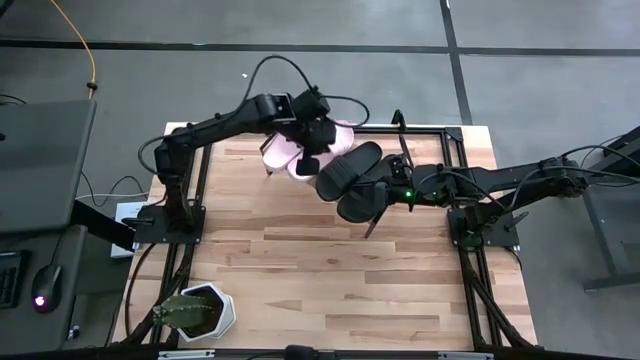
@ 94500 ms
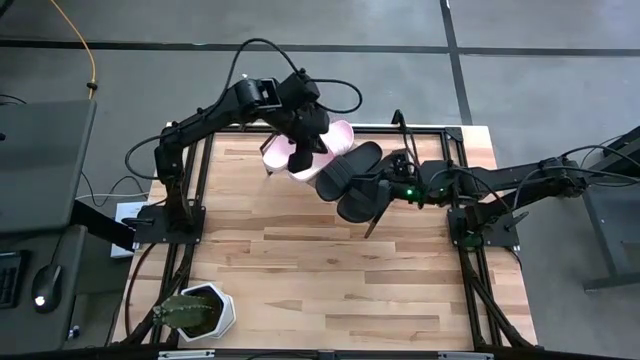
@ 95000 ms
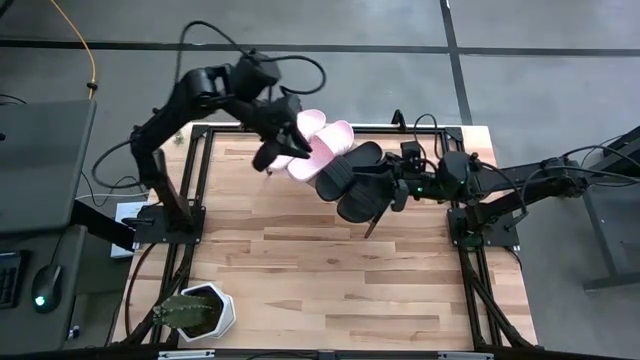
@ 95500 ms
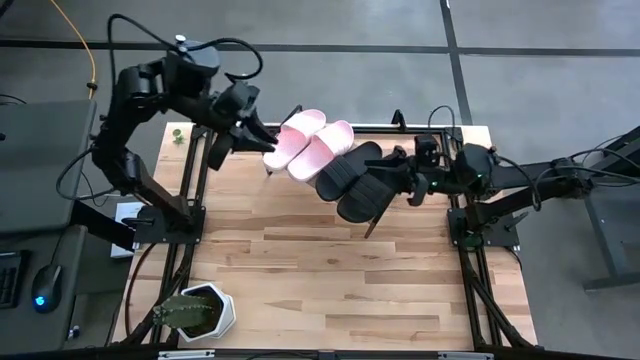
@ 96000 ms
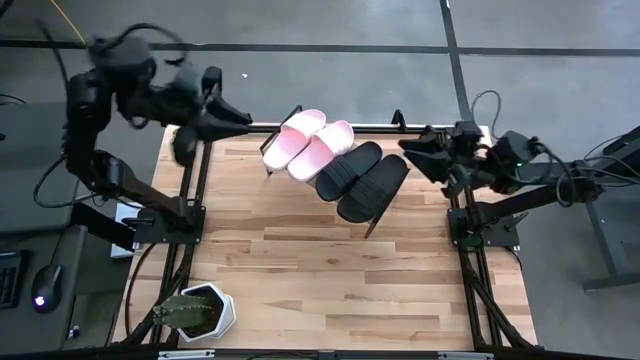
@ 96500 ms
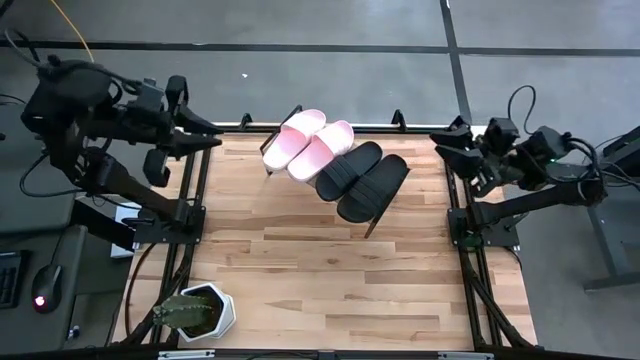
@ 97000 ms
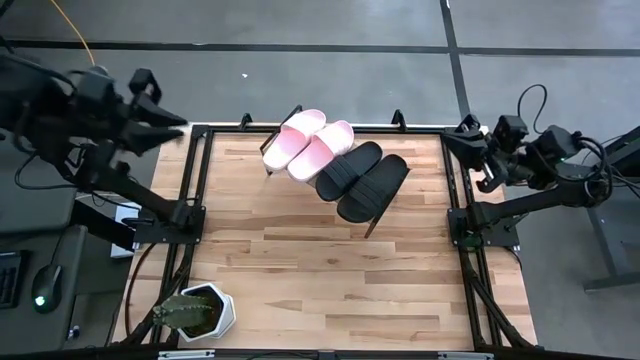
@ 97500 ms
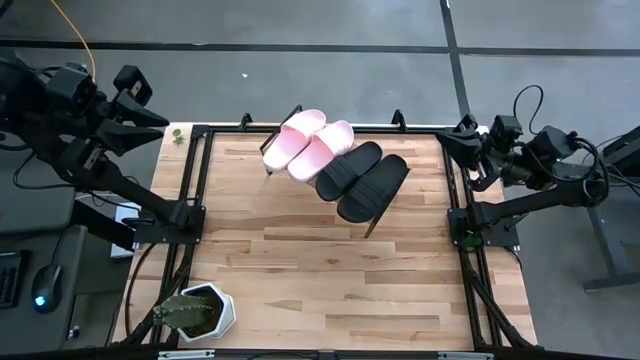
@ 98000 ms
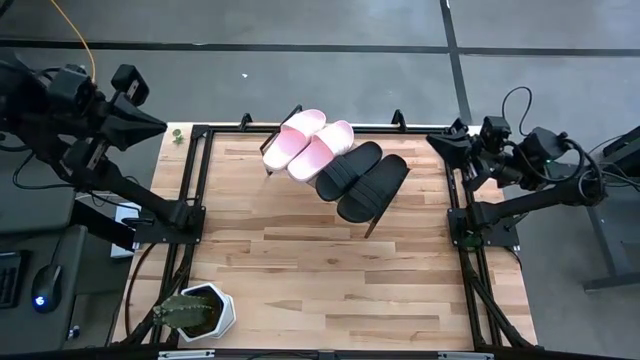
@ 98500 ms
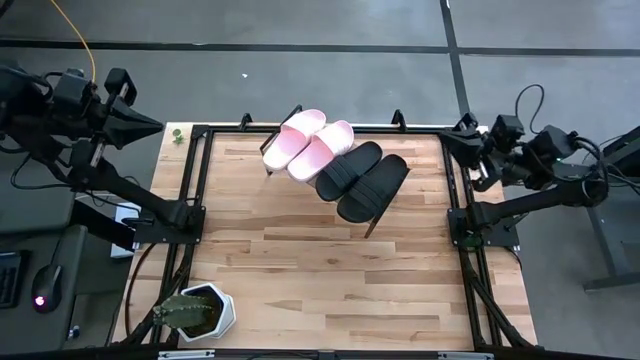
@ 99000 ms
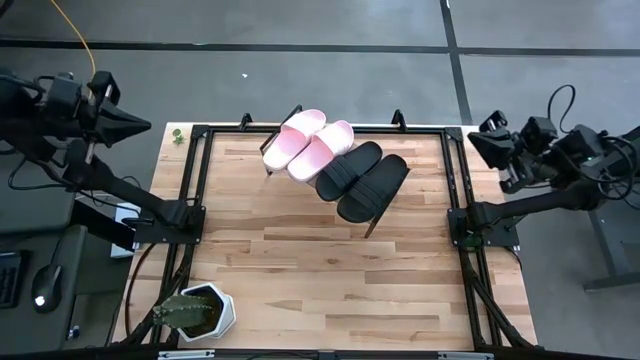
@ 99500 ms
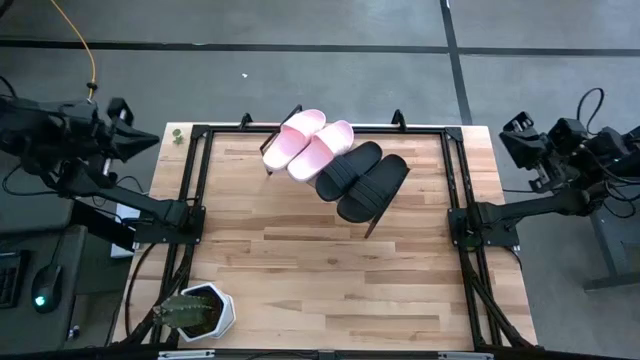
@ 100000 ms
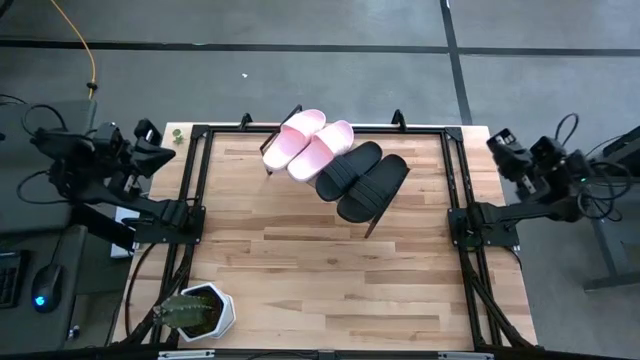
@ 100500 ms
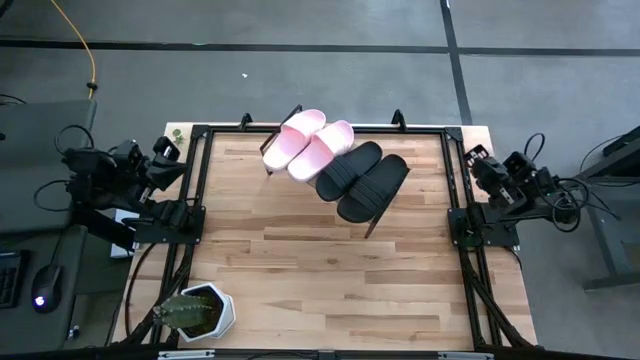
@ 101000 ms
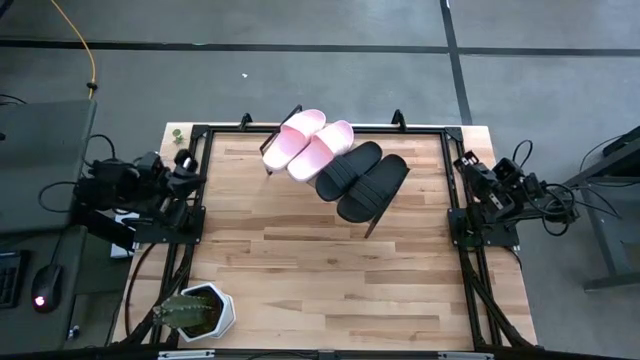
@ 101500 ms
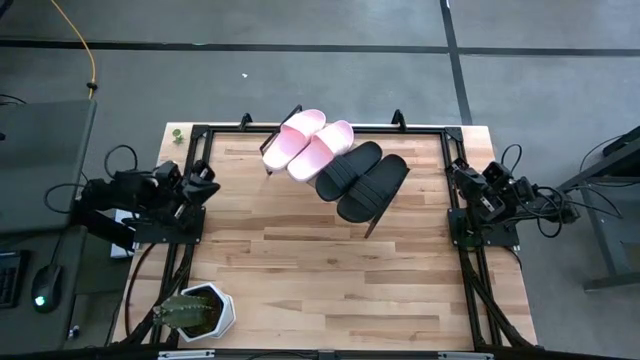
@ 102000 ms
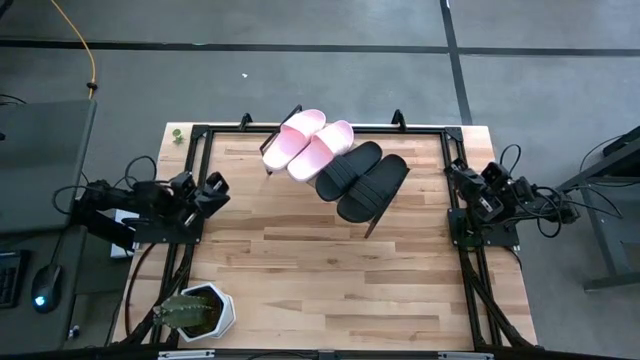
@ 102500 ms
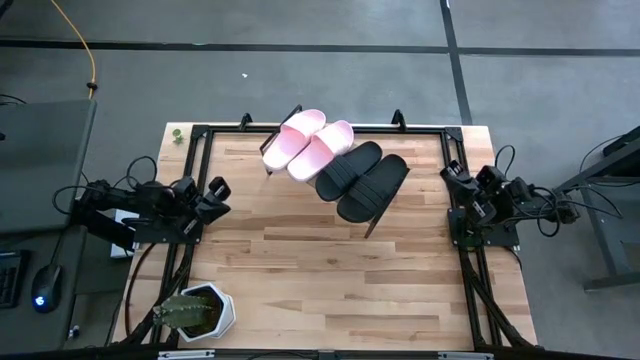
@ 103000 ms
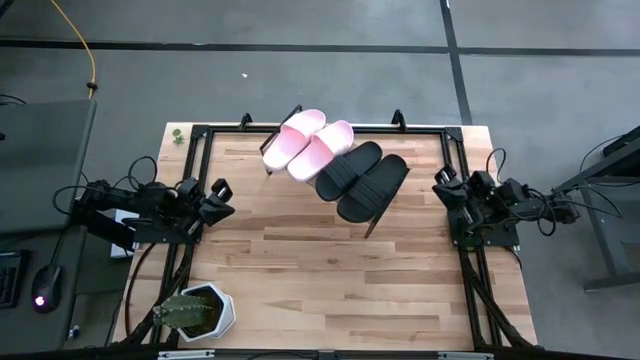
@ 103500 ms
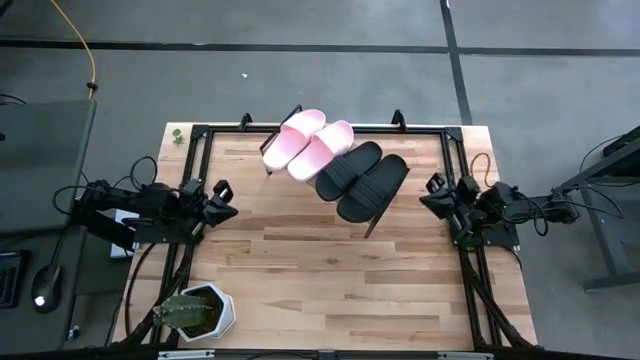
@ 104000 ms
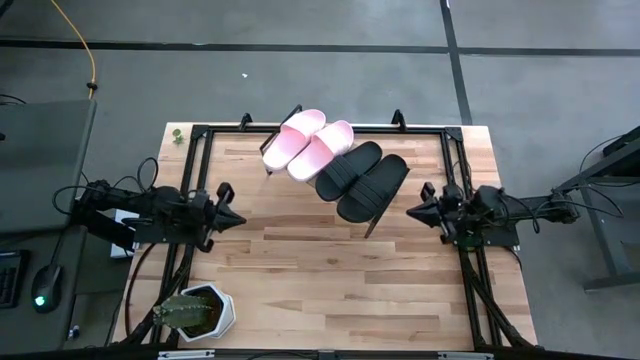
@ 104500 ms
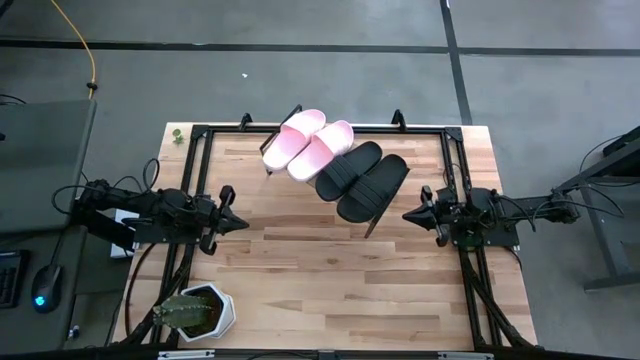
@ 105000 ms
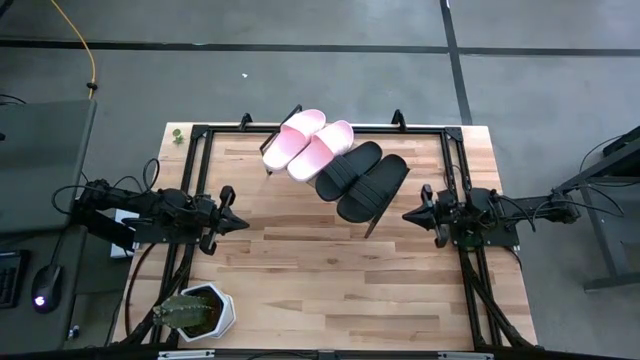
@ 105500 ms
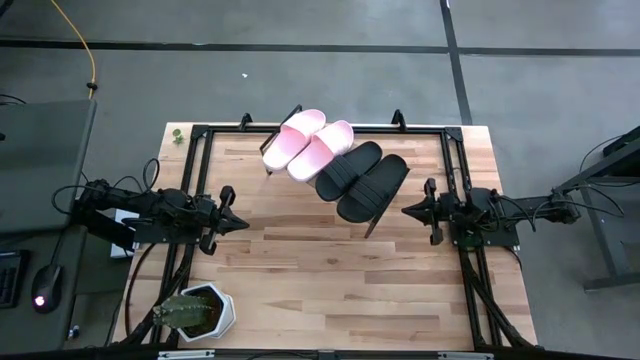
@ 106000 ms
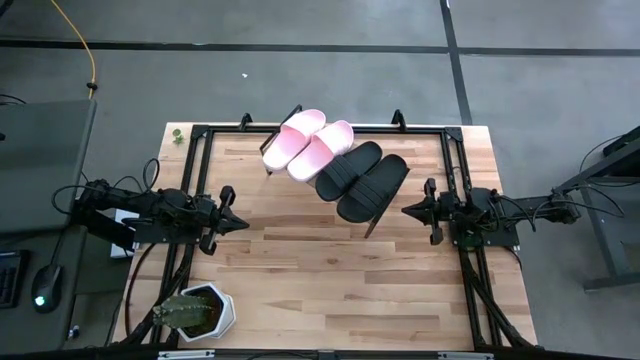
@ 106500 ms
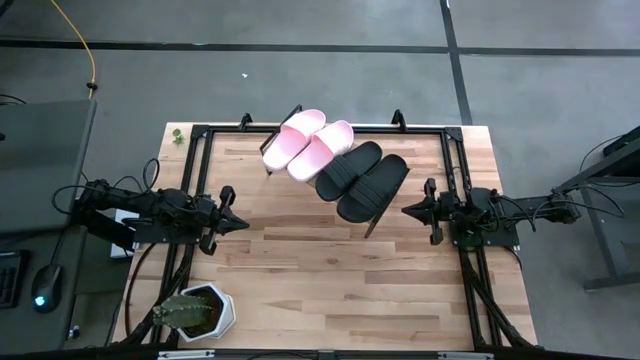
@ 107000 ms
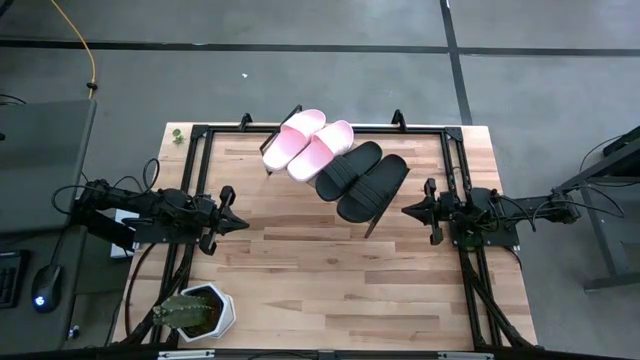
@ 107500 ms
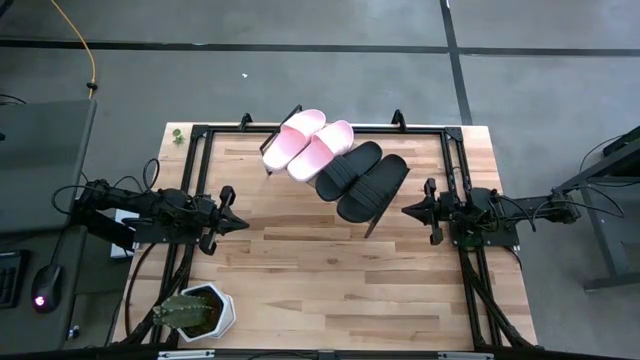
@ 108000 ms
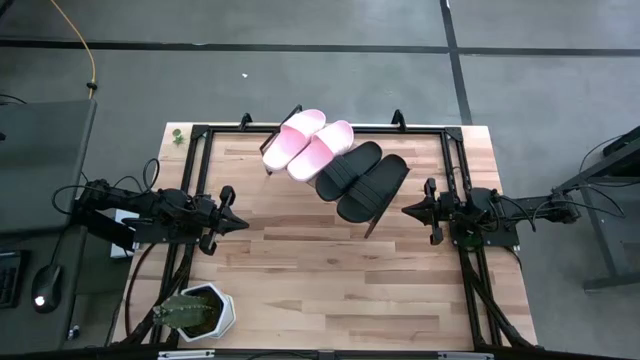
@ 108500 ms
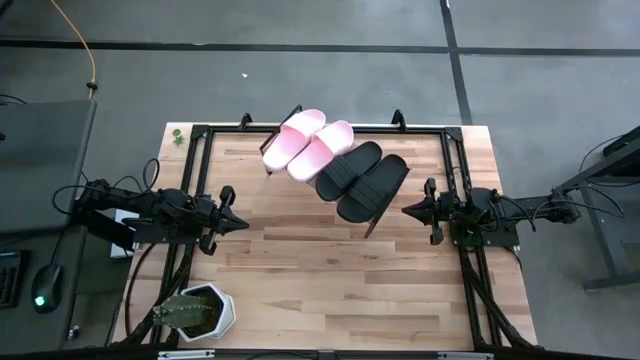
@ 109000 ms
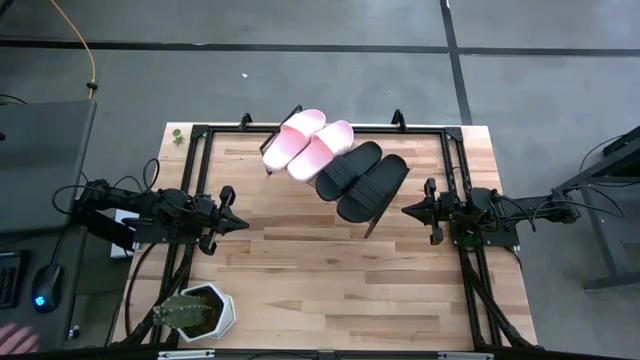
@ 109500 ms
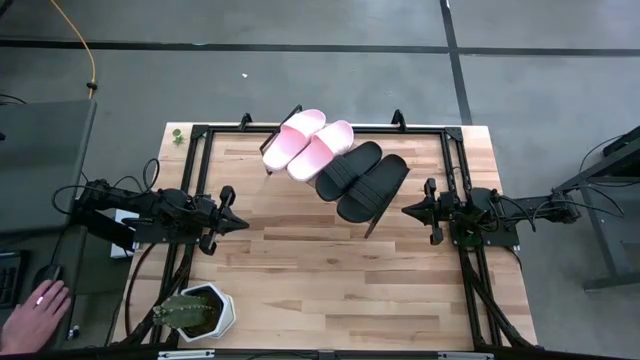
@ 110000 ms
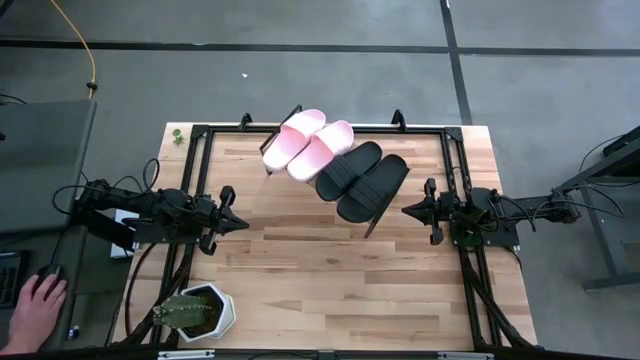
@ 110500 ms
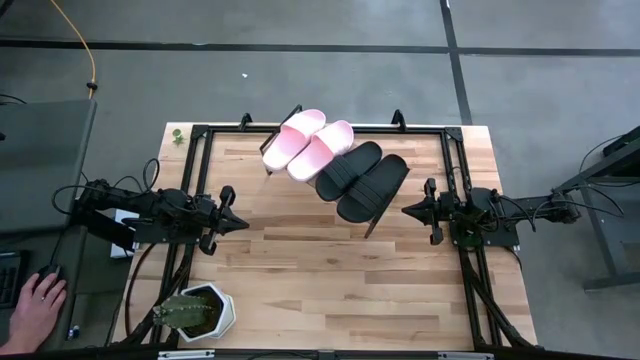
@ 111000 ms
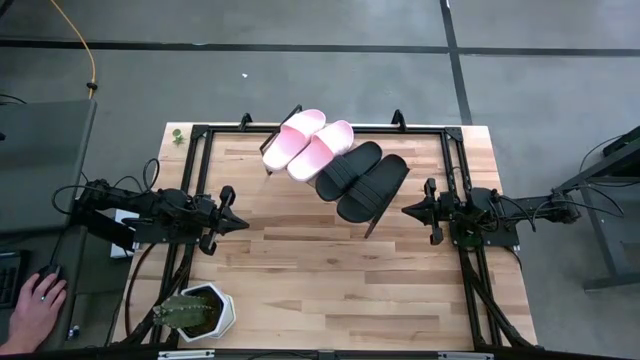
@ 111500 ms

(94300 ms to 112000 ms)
Task: Pick and place slides into the shelf
Return to Home Position

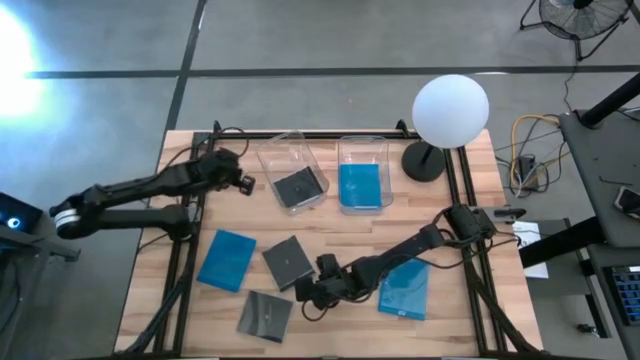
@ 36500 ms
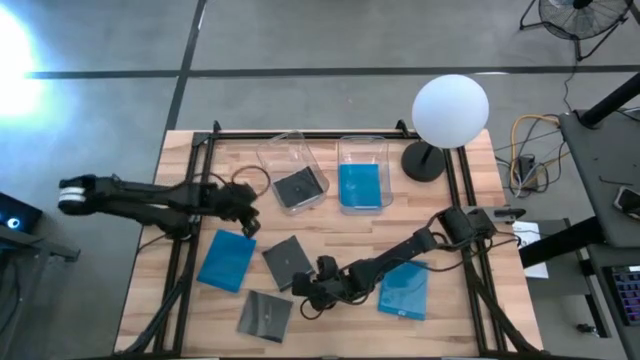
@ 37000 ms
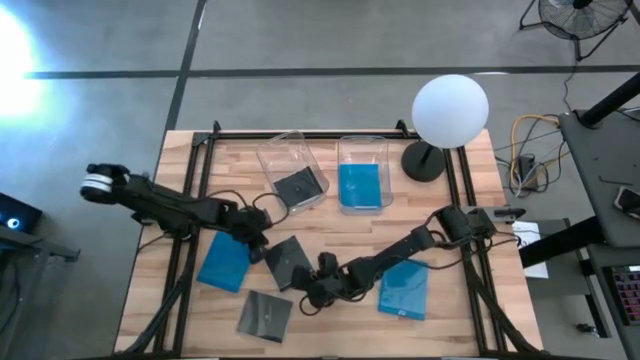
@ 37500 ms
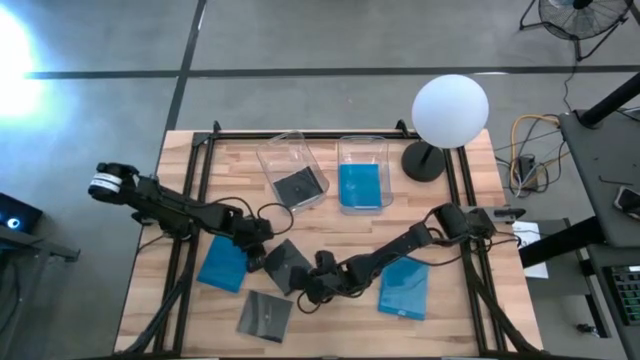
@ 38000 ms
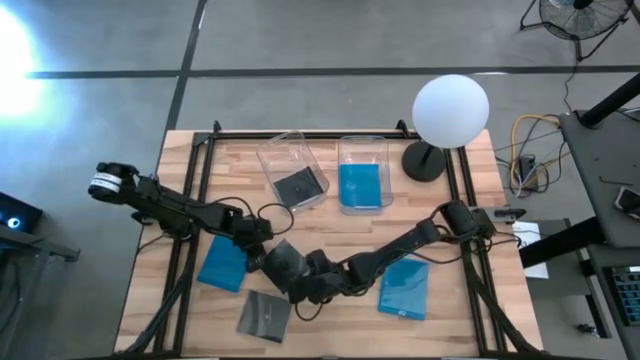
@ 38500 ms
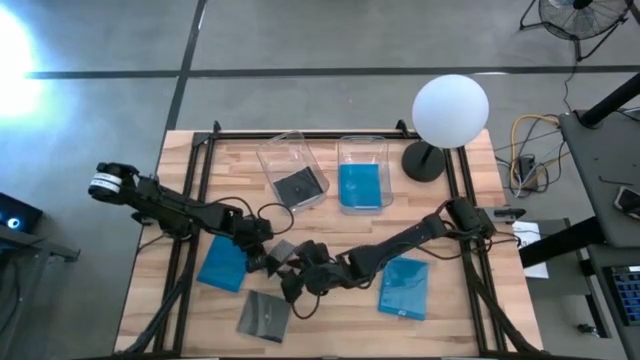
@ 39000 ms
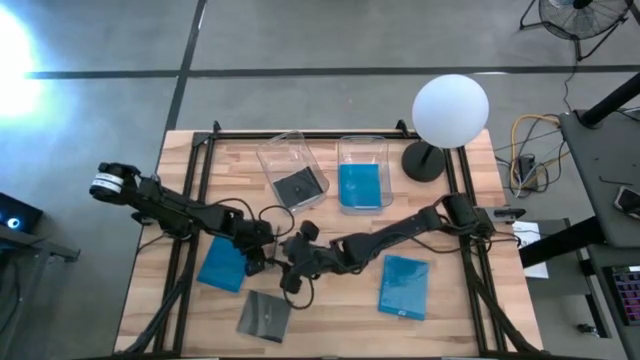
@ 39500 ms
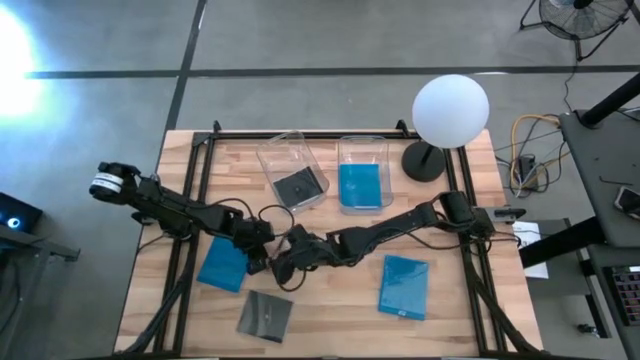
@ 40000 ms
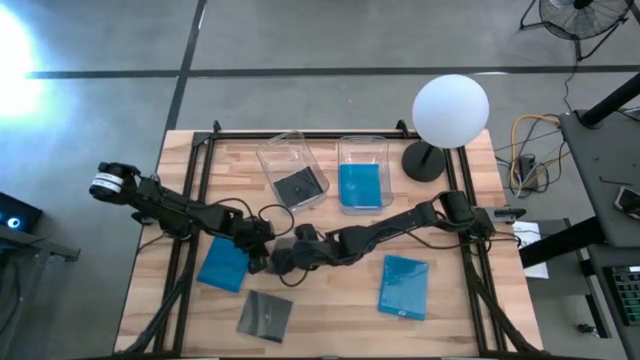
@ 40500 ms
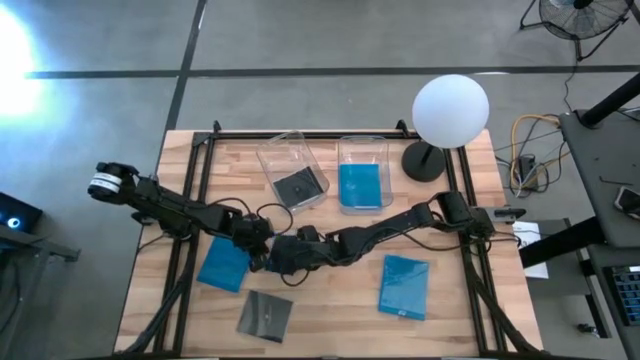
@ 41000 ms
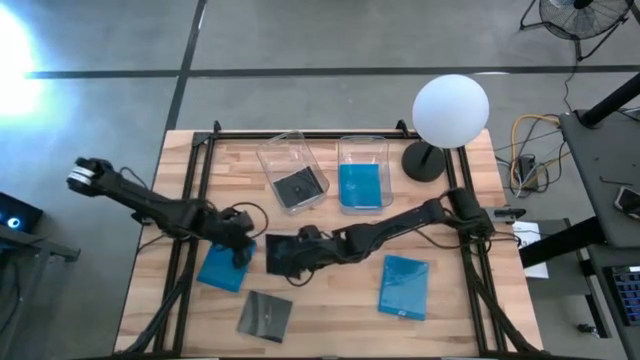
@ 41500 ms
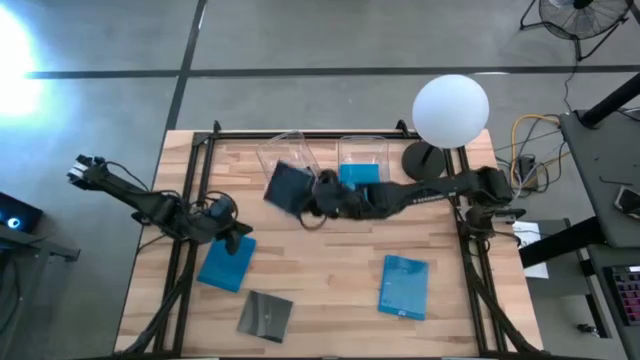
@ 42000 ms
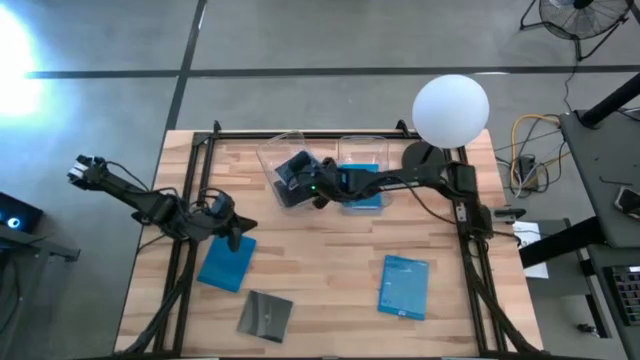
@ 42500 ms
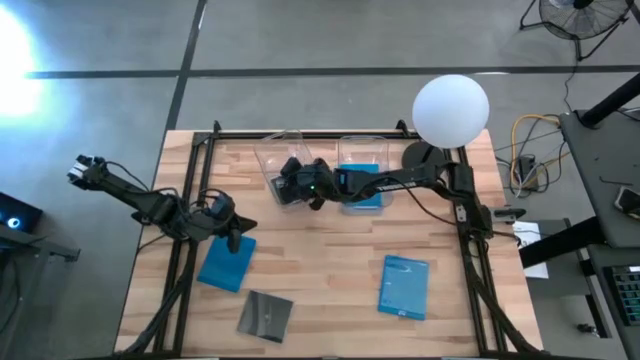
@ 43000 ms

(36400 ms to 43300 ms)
Task: Pick & place jewel cases by type
Put the top black CD case on the table into the left transparent bin
